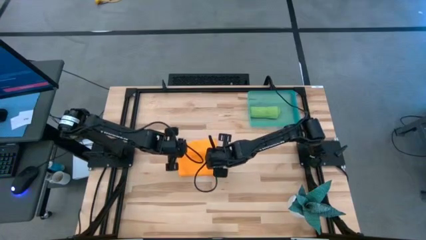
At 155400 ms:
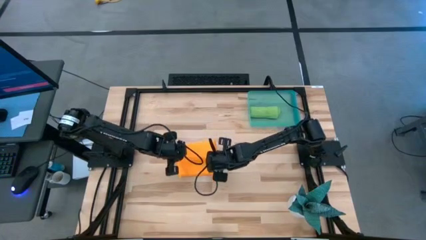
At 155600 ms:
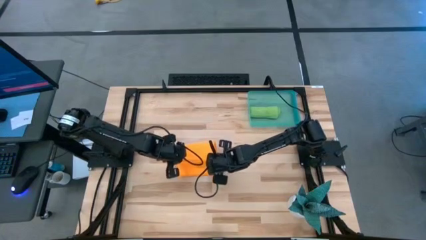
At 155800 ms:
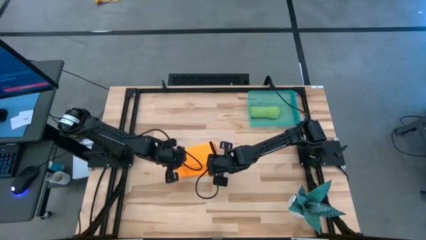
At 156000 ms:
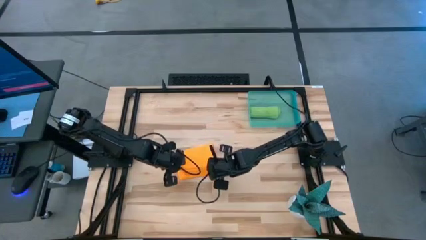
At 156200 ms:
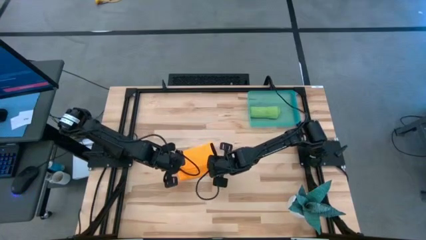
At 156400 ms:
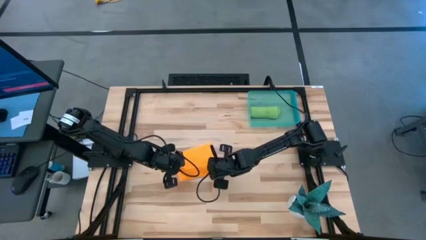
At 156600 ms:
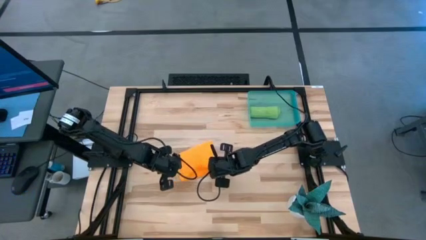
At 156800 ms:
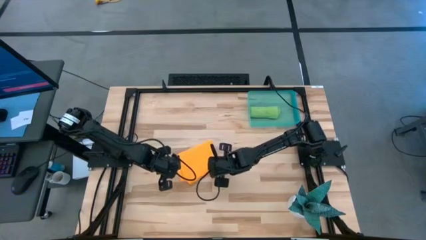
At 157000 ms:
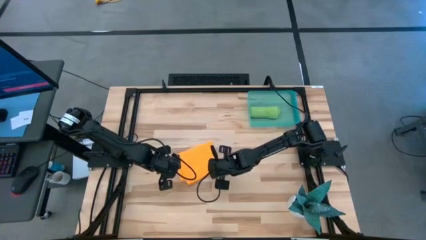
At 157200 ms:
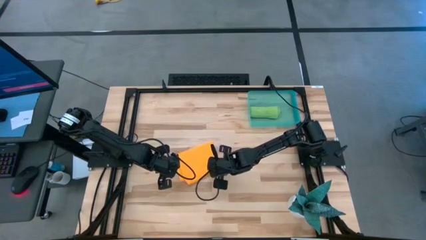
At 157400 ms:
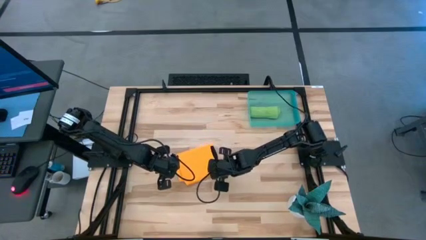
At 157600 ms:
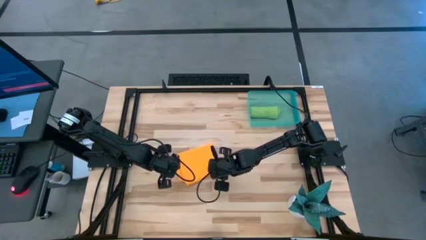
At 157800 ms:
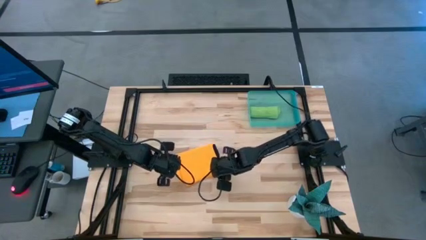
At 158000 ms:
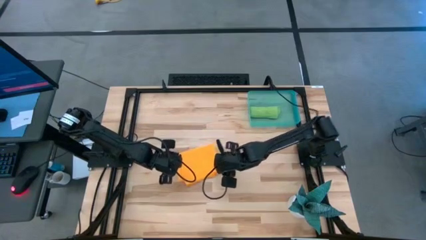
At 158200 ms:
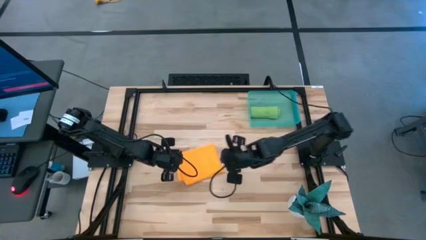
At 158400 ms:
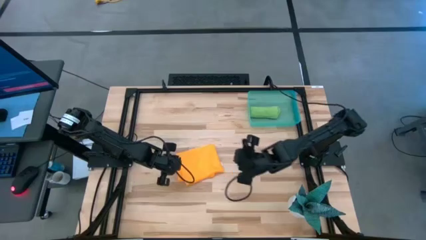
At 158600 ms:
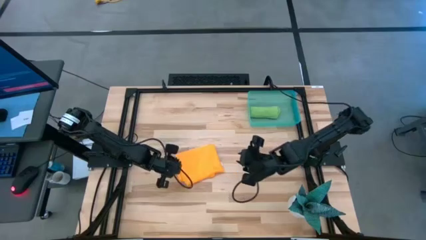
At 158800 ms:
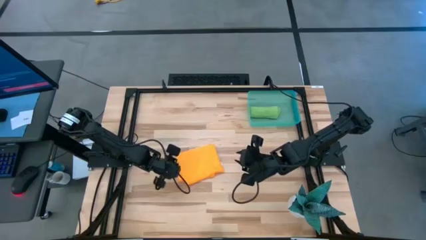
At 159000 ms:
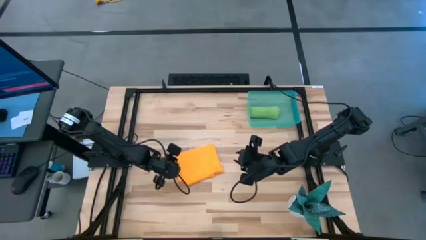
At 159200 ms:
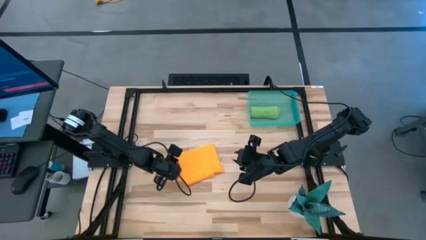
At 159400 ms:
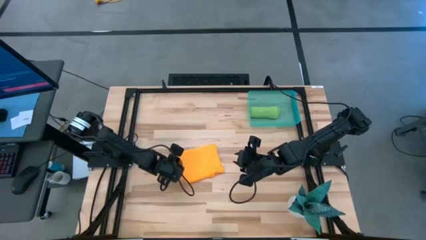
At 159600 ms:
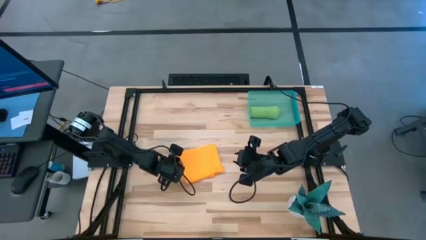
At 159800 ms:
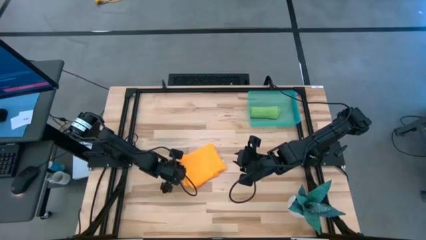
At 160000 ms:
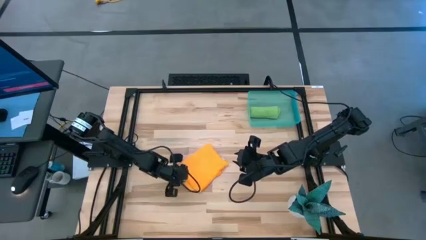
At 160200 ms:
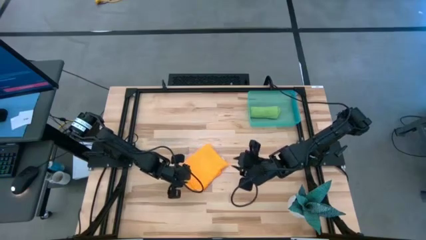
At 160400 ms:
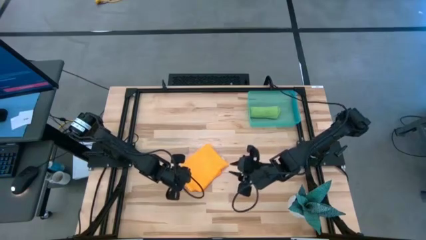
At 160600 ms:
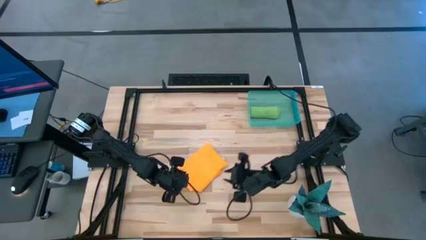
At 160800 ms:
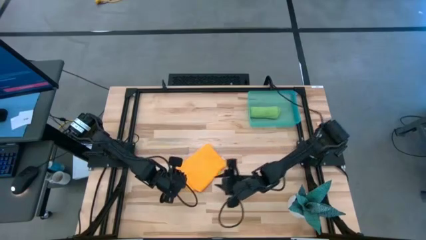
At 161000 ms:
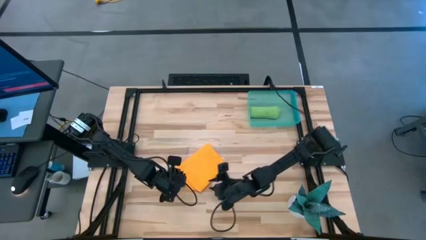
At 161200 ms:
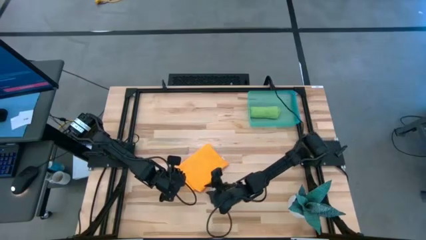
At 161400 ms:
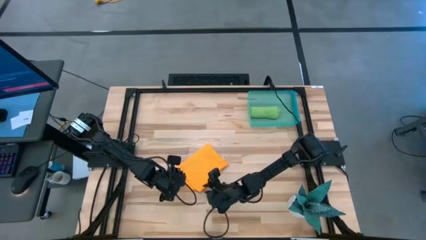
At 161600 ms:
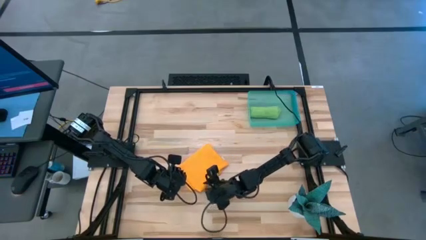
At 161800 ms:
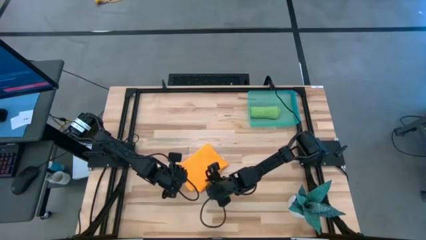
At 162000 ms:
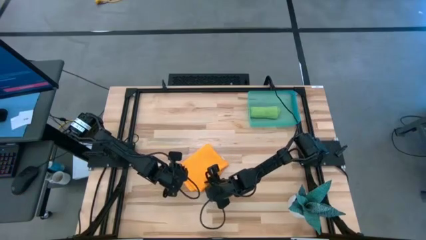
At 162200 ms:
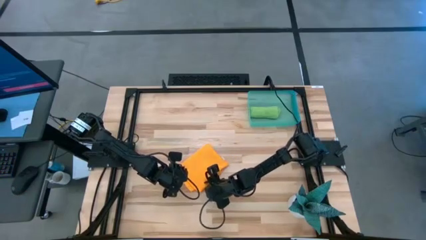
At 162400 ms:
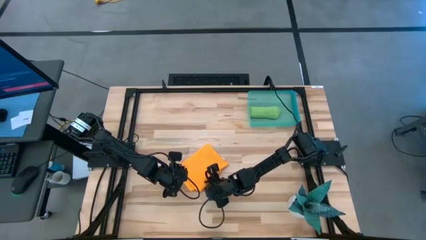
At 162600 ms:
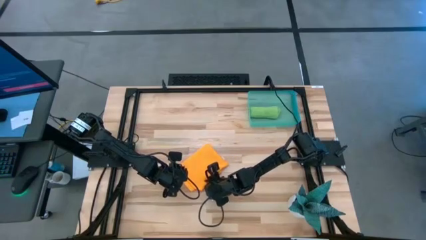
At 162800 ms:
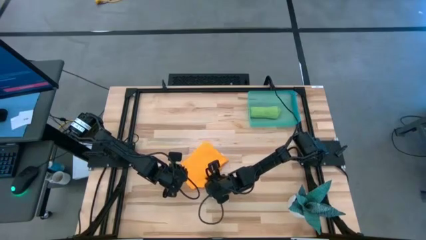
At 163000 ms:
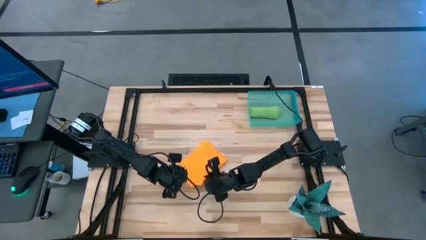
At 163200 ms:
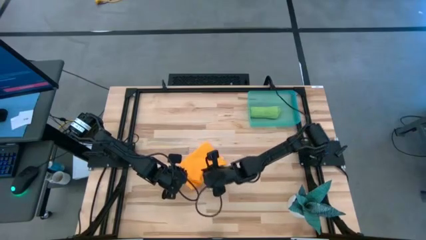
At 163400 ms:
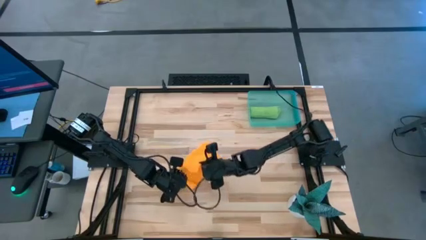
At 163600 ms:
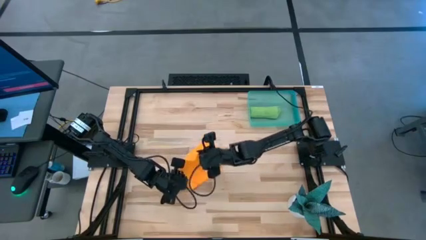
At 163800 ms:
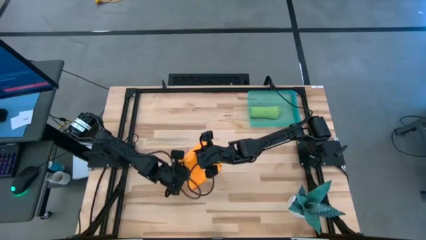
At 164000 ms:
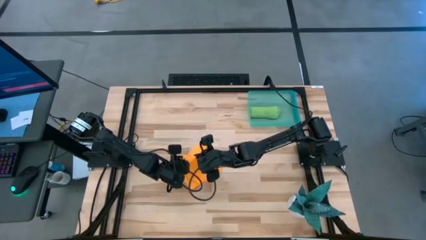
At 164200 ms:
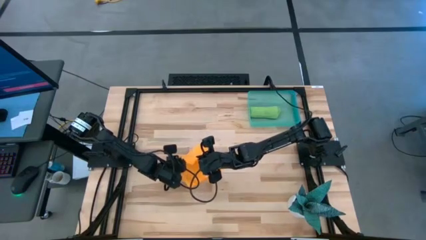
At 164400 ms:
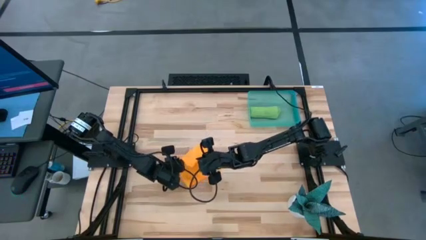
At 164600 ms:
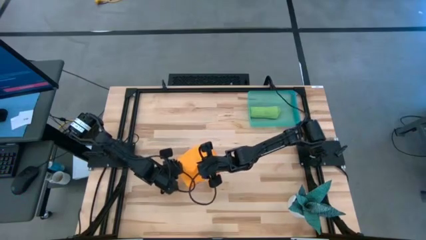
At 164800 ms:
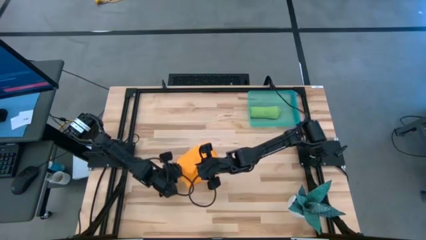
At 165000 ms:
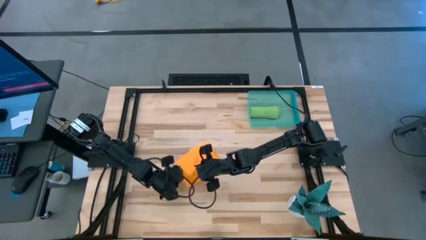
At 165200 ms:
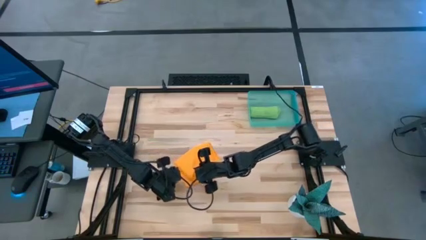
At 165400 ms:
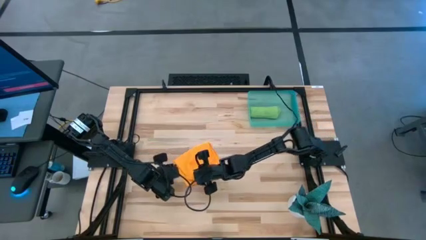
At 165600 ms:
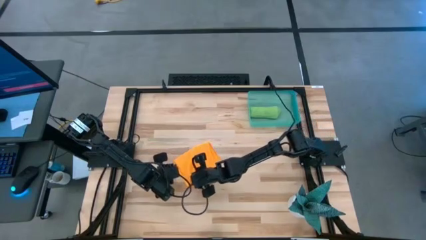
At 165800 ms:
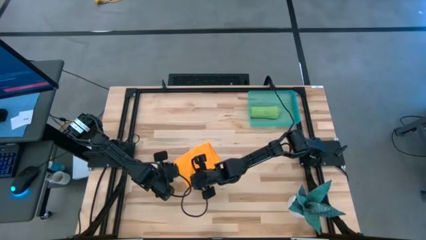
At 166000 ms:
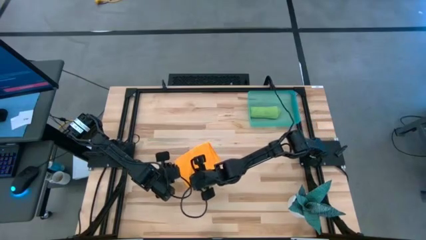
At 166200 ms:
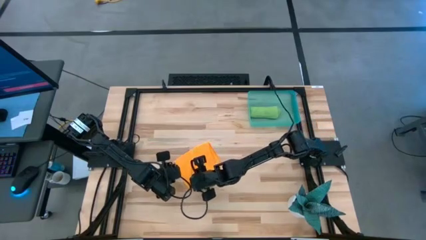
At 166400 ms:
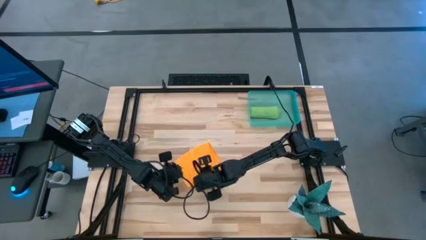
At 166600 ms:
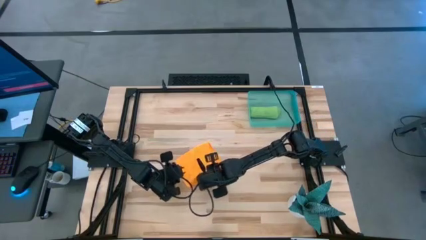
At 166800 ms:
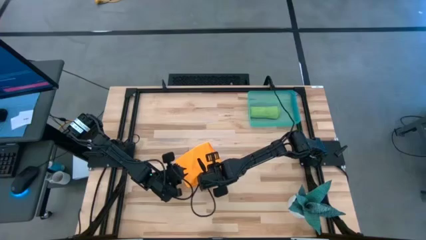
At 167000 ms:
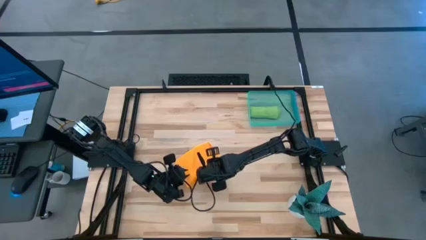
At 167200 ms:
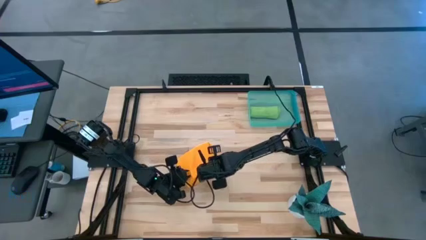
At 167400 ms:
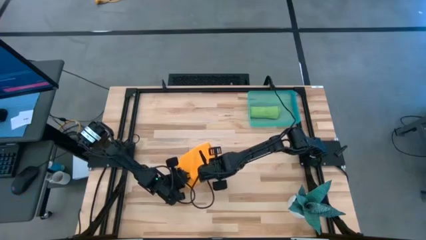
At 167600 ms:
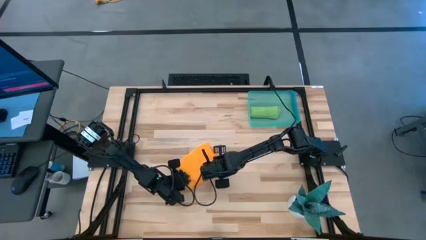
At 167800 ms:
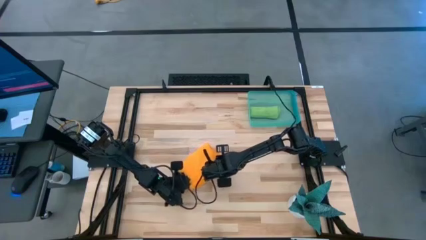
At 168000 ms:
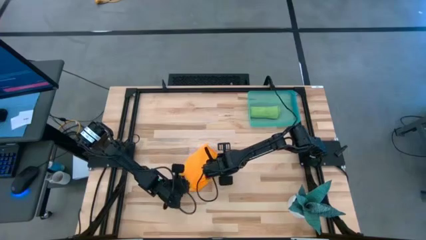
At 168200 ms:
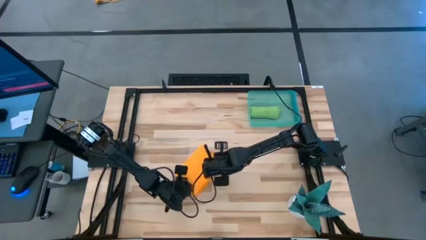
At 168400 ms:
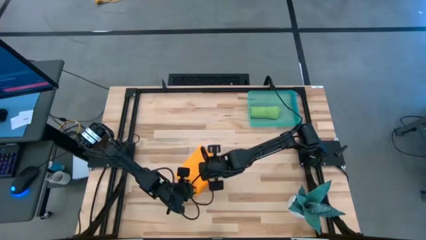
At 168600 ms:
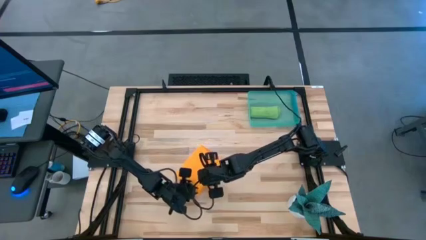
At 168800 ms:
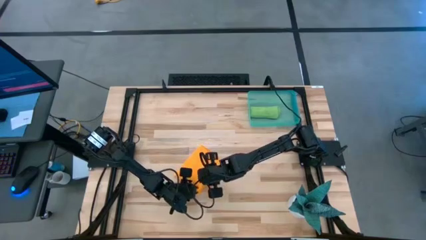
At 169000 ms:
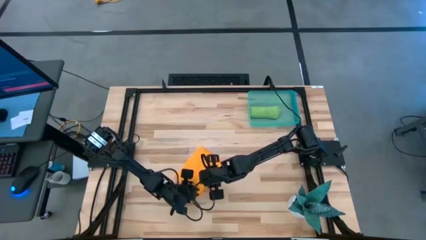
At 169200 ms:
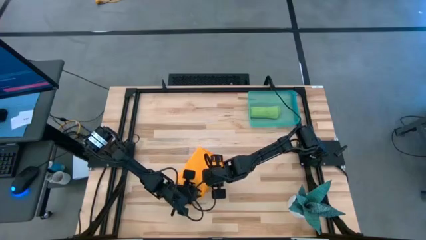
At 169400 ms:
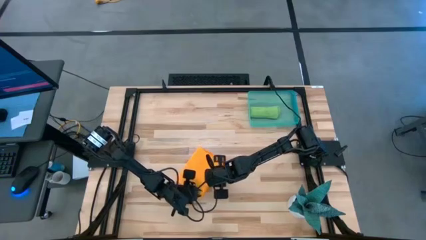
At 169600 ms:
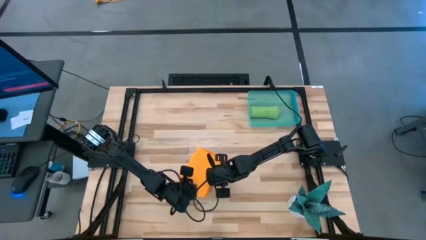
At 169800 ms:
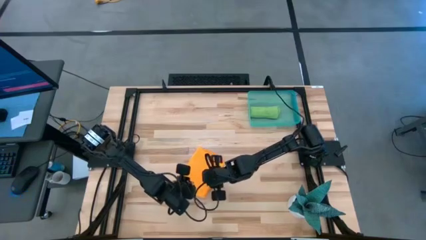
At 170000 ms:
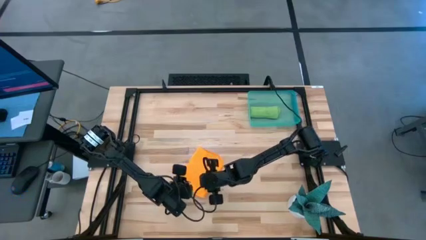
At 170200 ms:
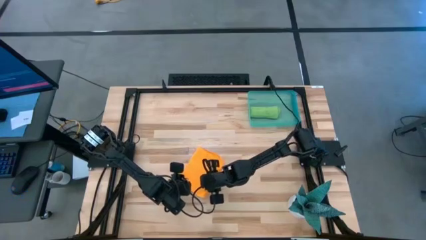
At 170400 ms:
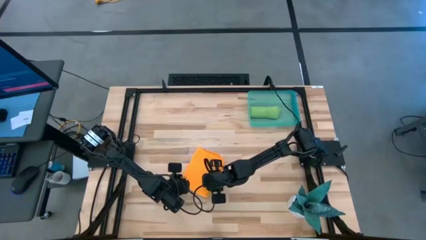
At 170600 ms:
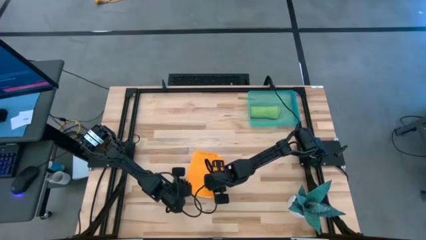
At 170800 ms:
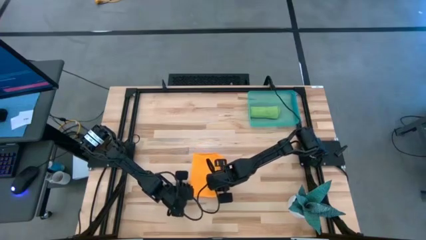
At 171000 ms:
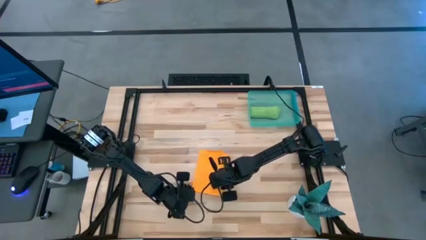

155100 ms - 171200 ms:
Task: Roll microfiber towels into tight, uniform cylinder then place into a basket
Fold the orange microfiber towel
